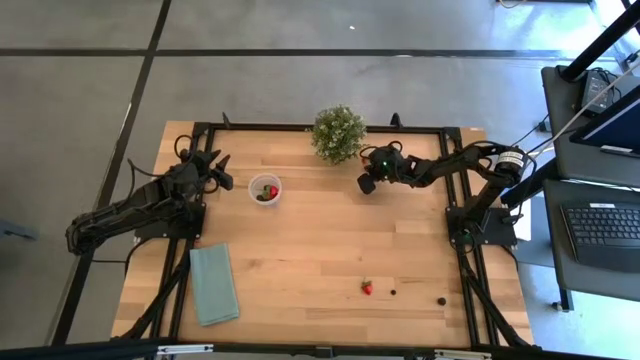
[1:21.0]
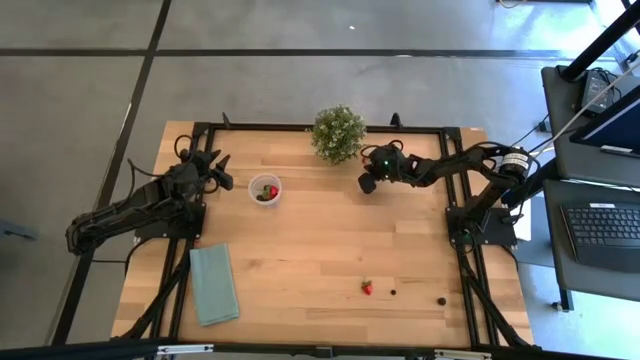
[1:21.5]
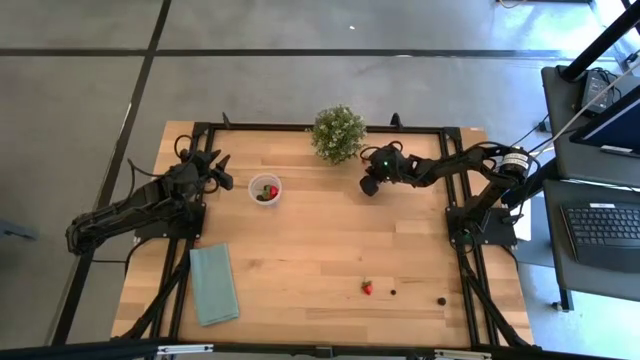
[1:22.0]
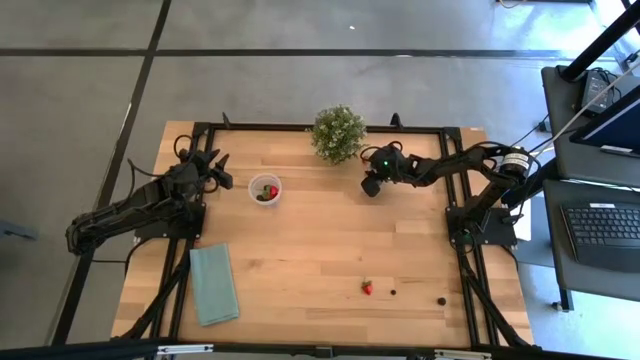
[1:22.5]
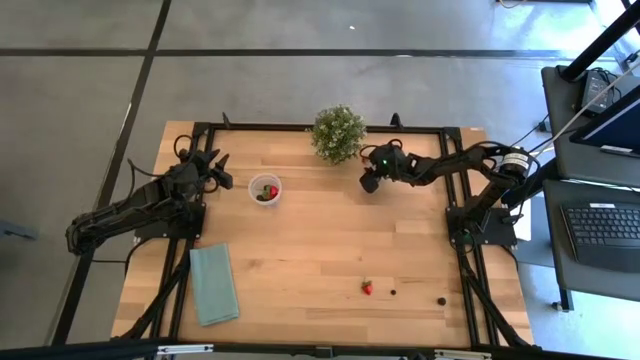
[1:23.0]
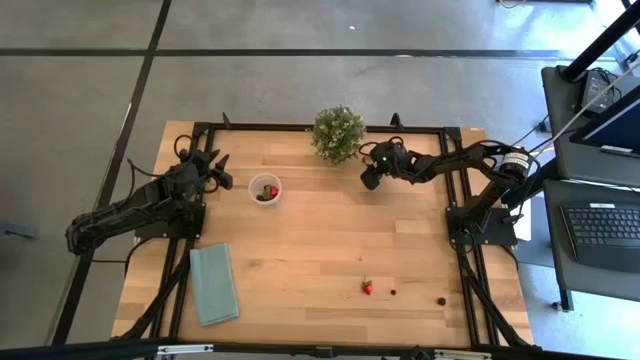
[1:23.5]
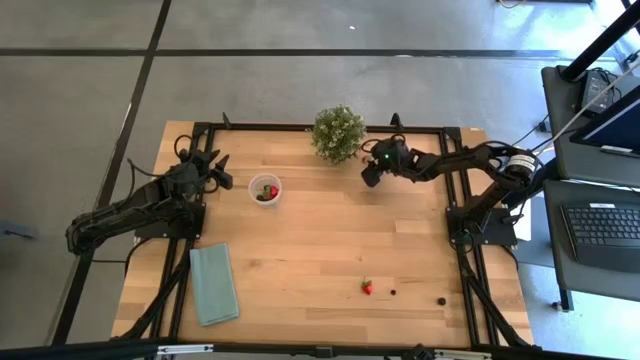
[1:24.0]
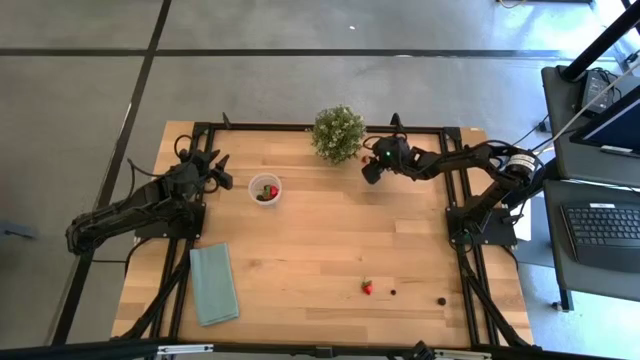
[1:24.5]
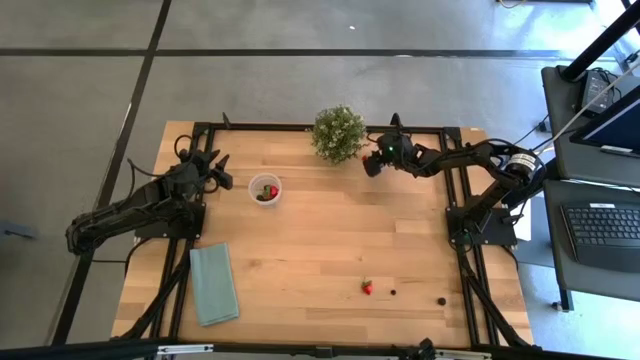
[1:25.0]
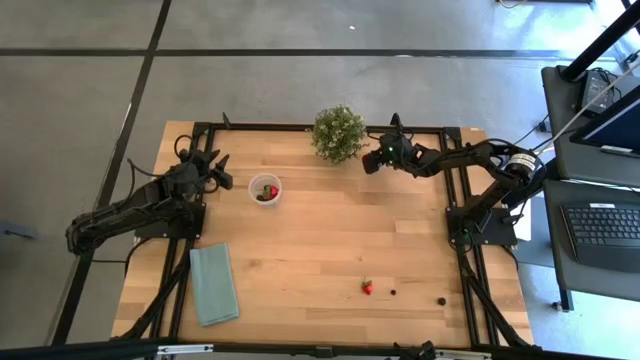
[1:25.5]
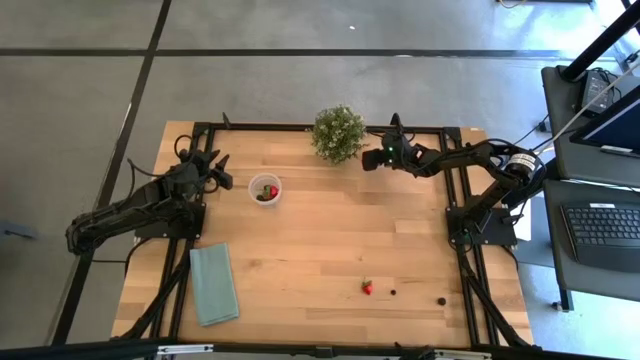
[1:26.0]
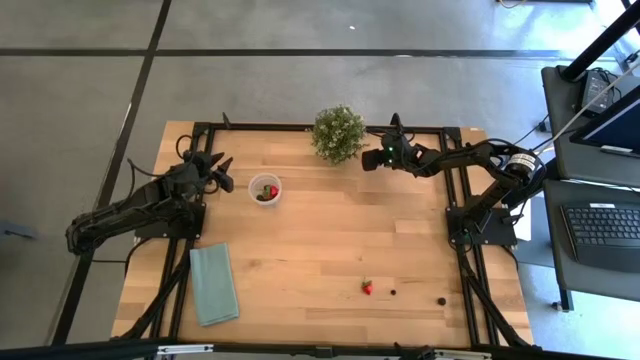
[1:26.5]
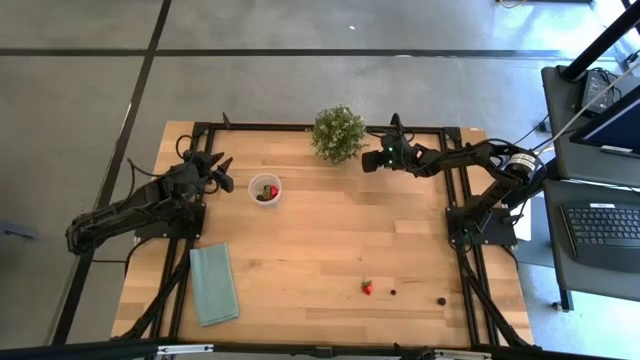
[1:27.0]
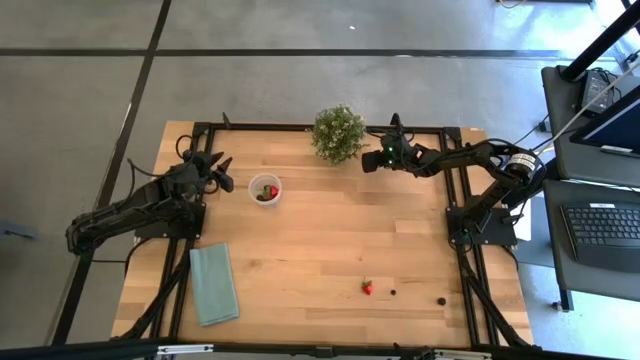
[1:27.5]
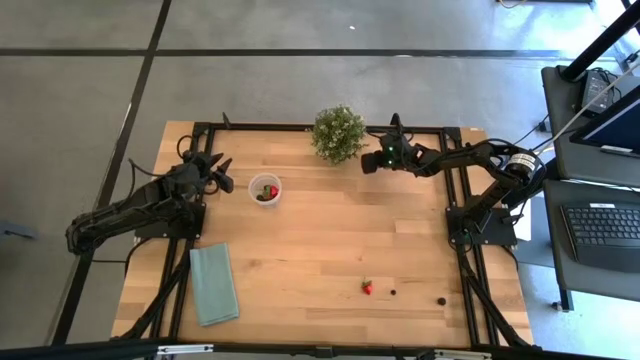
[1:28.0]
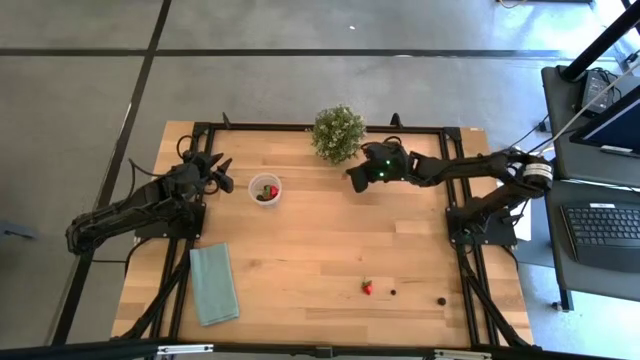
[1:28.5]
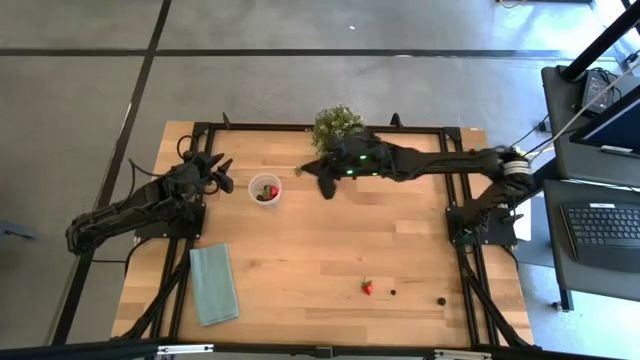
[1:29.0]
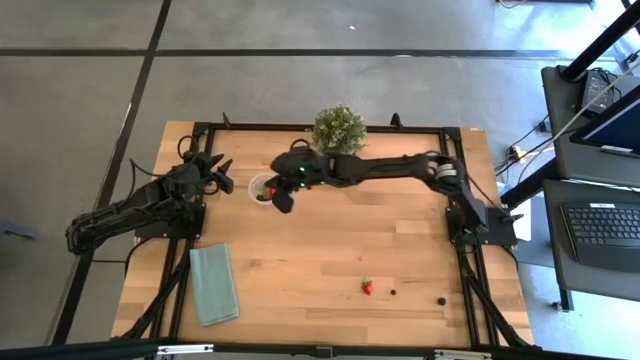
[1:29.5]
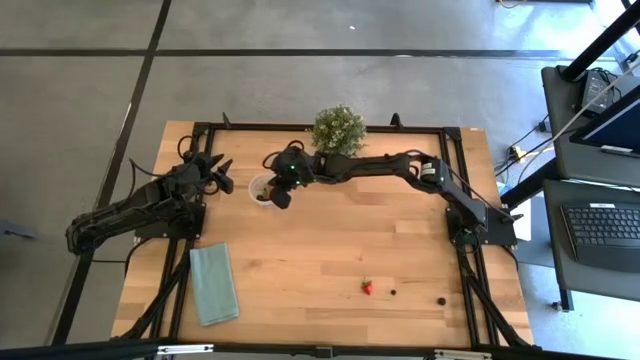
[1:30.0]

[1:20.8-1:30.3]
Task: Pick and placing Produce into tupperware
Put the red strawberry into the transparent container

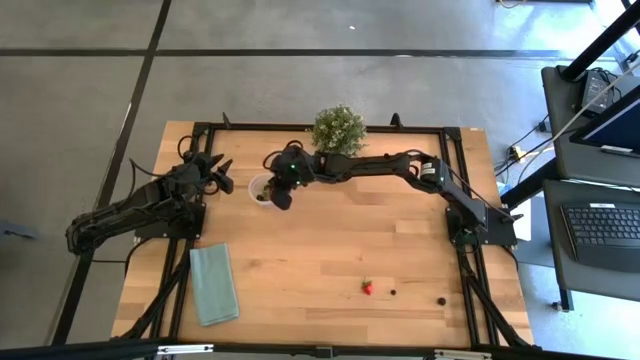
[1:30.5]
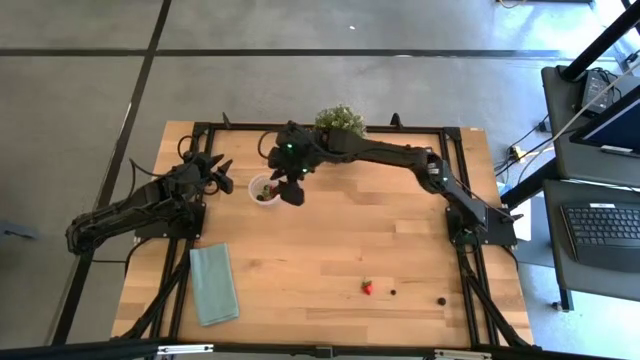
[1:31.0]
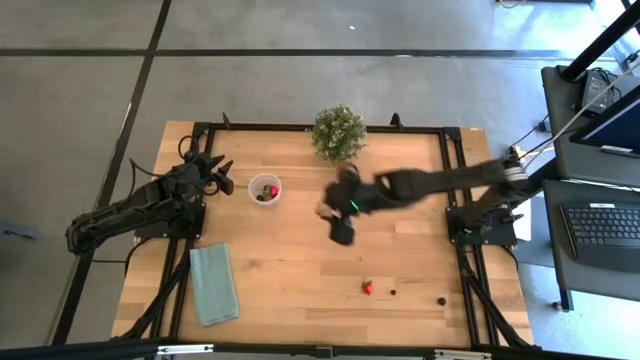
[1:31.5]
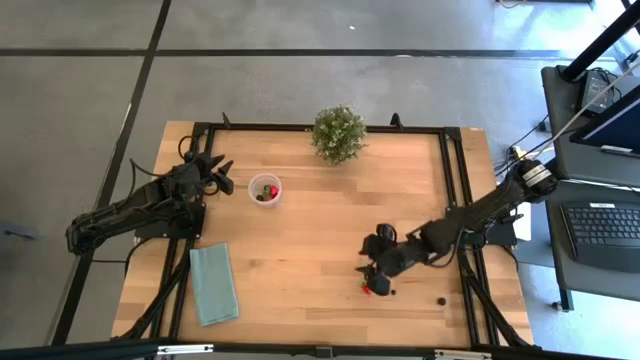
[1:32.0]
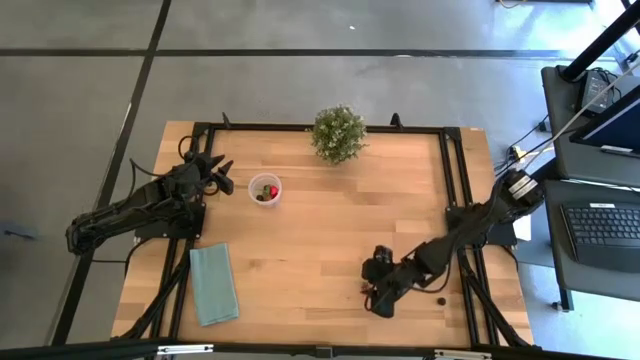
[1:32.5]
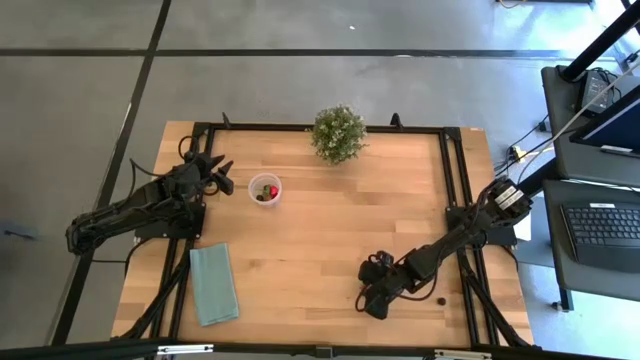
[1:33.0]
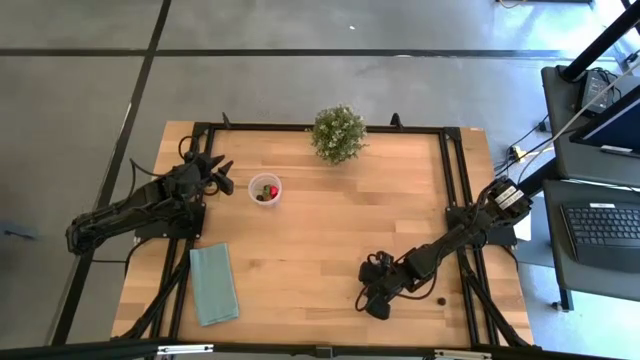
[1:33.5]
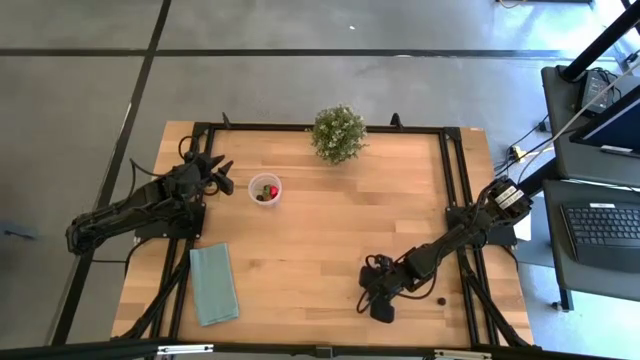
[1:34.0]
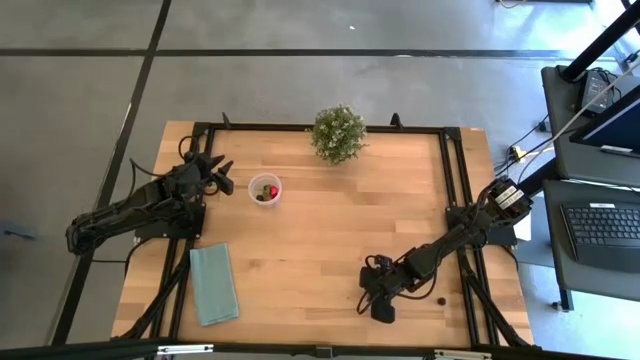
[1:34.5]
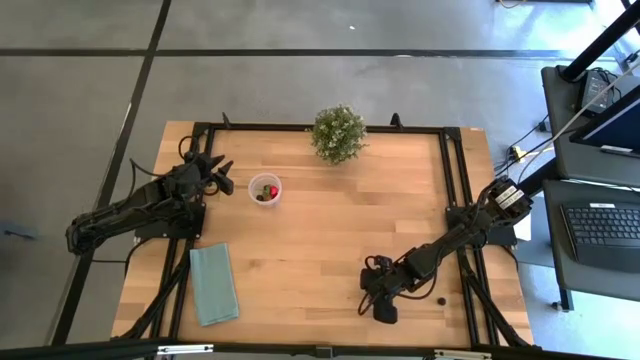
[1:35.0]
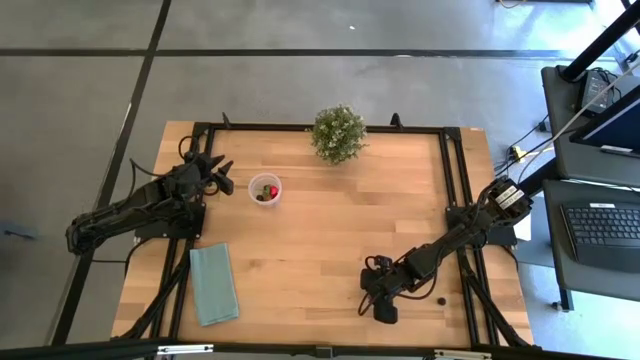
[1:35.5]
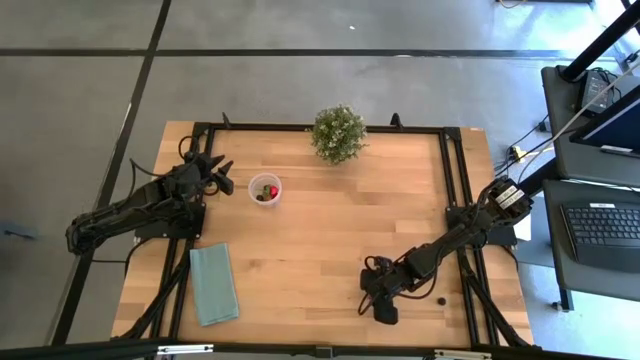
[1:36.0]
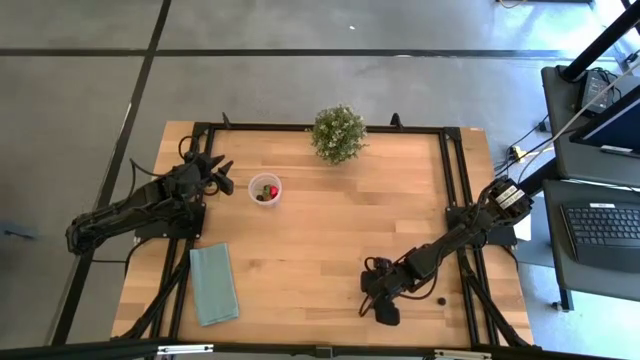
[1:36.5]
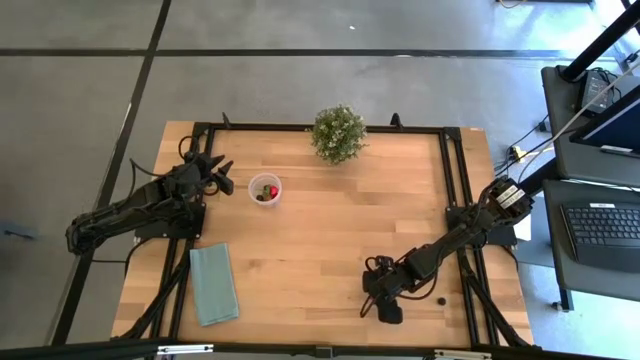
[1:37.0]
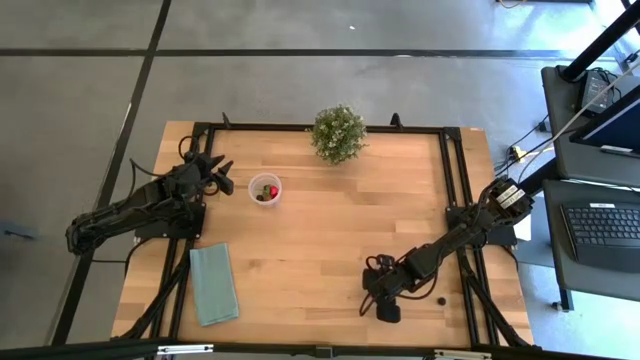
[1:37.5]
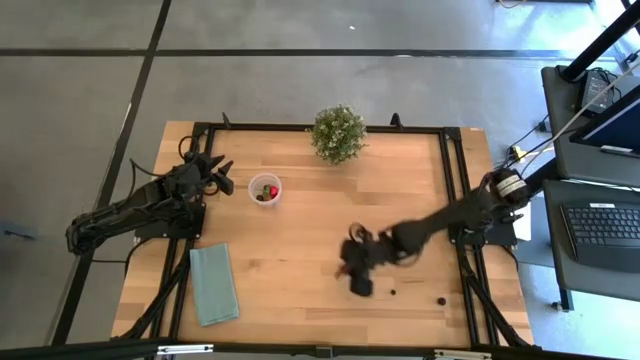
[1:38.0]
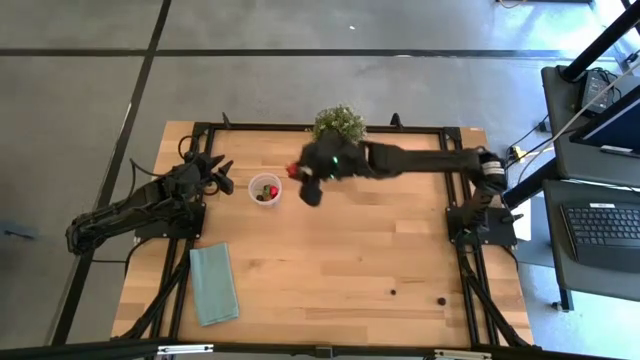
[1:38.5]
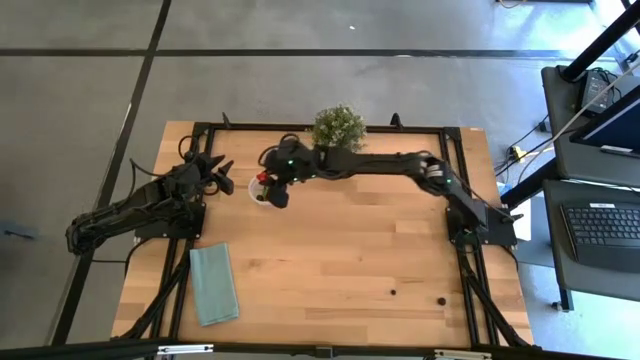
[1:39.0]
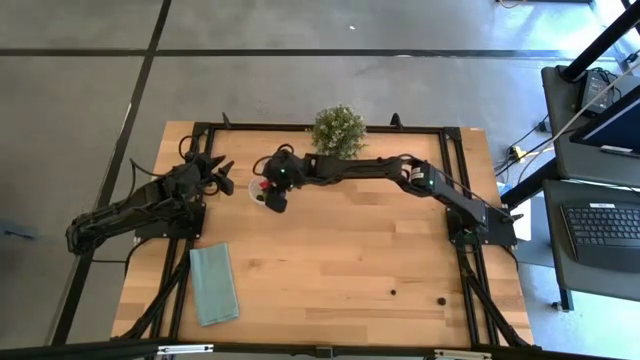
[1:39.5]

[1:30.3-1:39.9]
Put the red strawberry into the transparent container

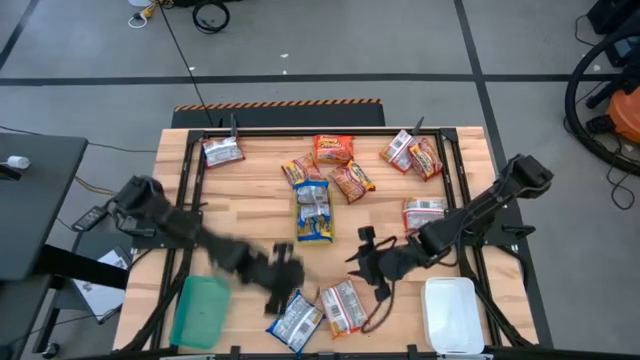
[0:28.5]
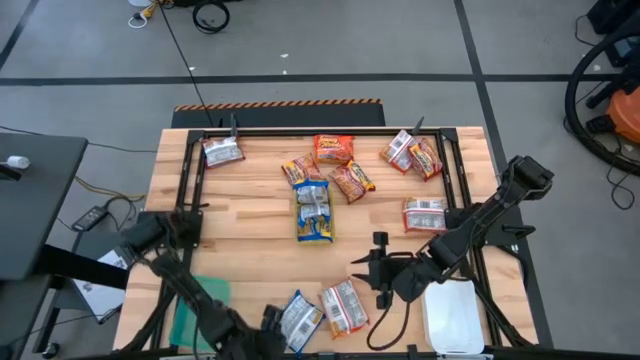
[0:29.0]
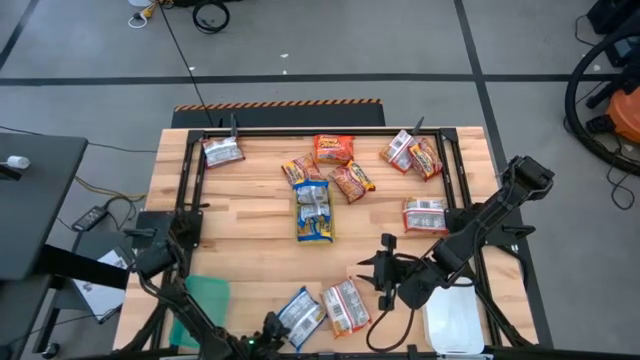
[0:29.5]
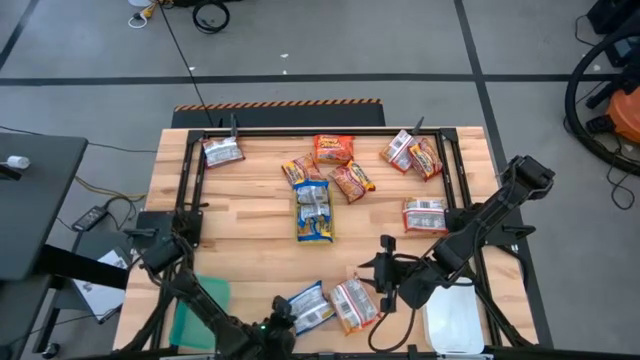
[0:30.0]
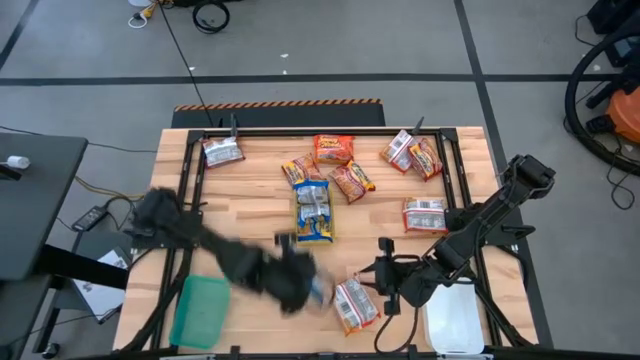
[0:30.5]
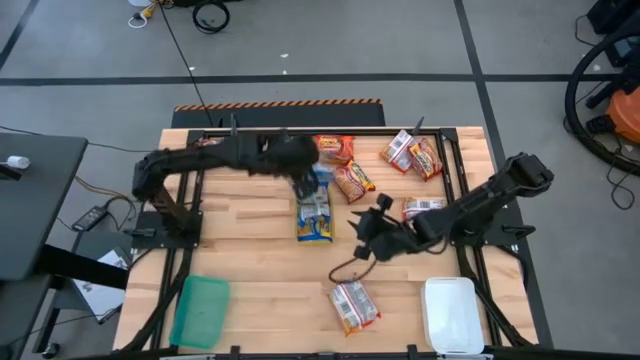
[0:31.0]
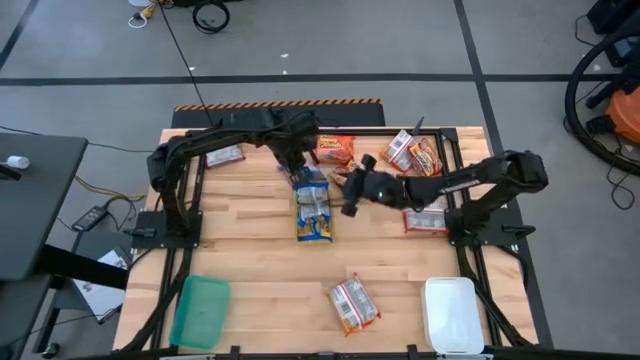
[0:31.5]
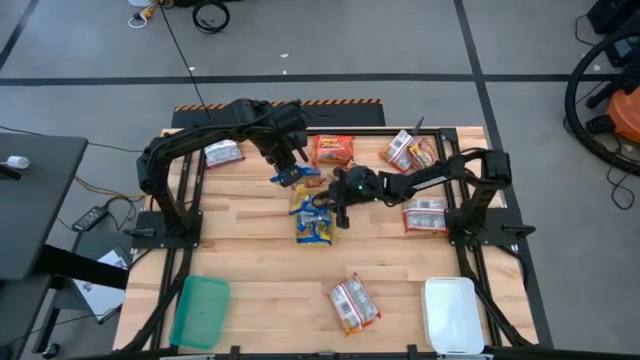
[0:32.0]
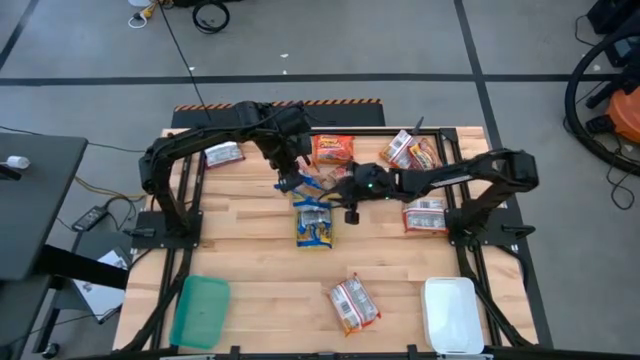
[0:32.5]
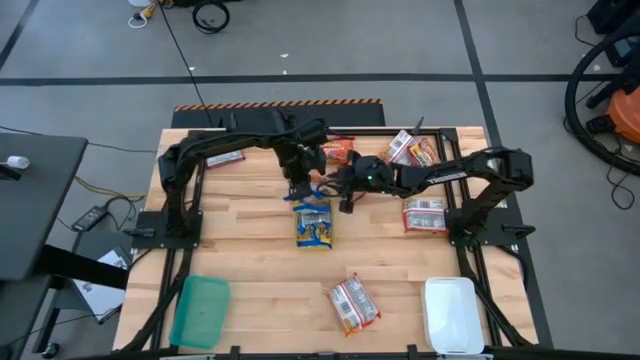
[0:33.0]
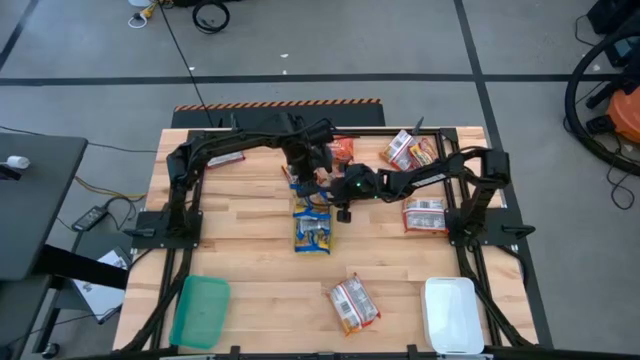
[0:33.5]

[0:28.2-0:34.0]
Task: Sort Maruchan noodles
Put the blue noodle pack into the yellow bin
